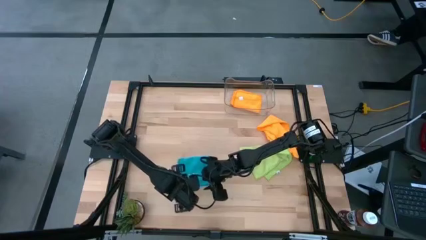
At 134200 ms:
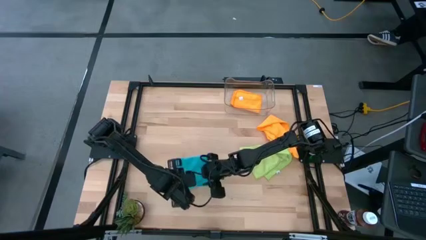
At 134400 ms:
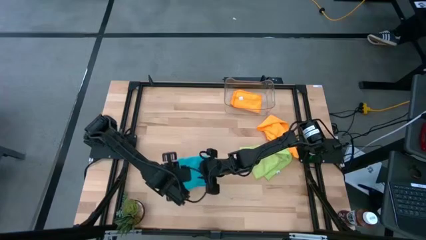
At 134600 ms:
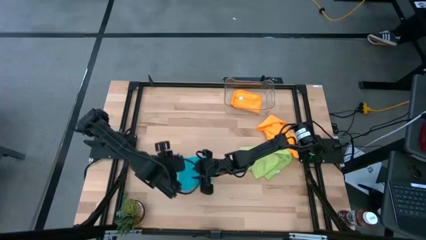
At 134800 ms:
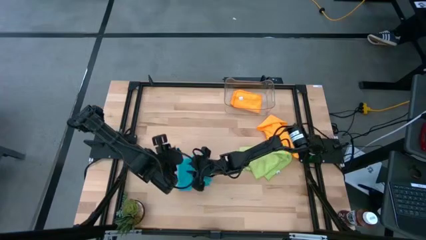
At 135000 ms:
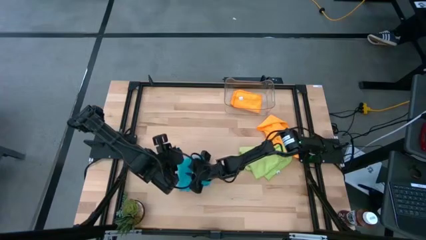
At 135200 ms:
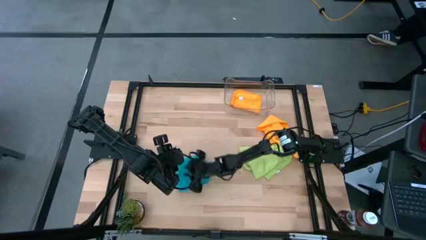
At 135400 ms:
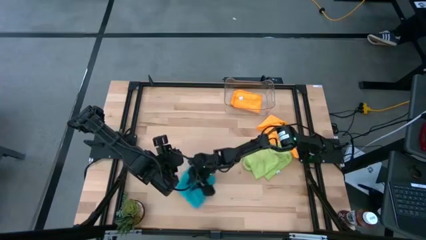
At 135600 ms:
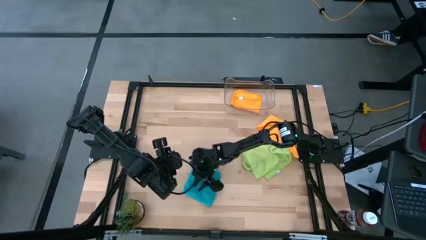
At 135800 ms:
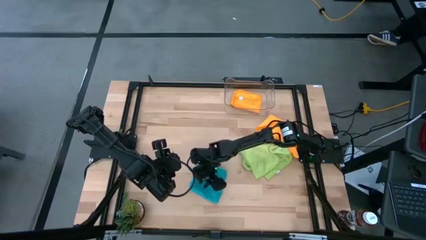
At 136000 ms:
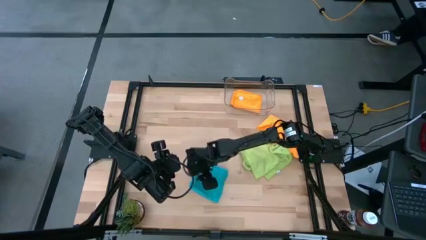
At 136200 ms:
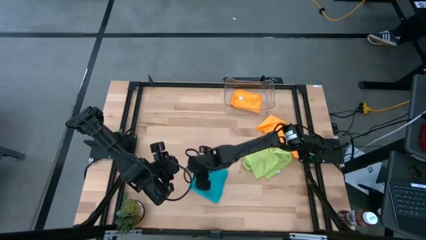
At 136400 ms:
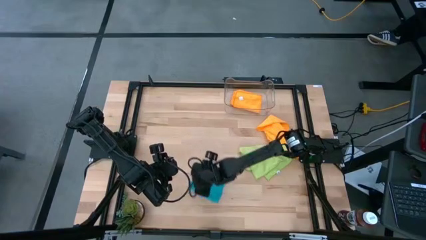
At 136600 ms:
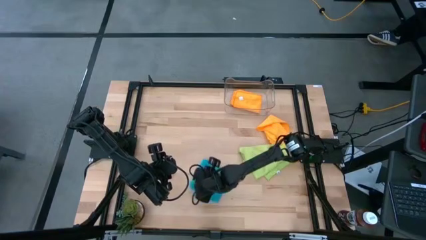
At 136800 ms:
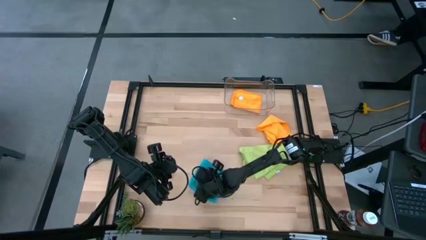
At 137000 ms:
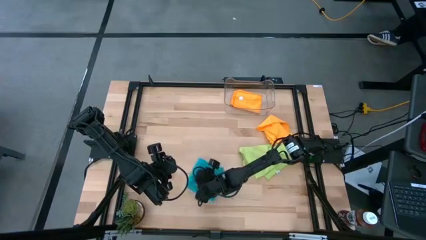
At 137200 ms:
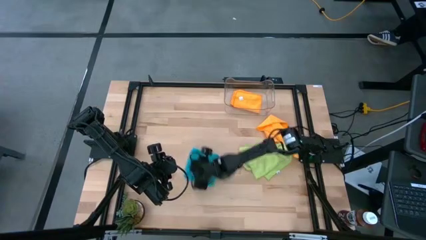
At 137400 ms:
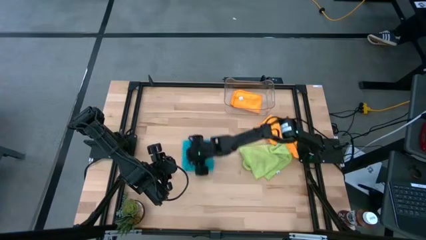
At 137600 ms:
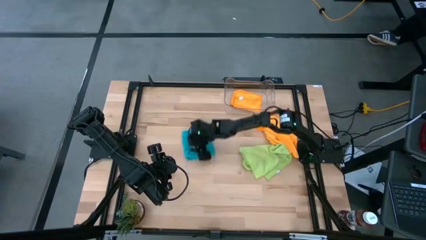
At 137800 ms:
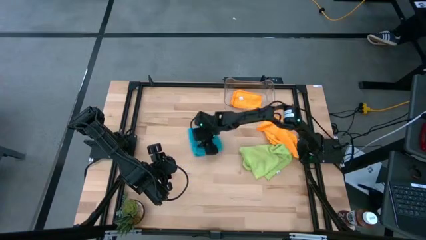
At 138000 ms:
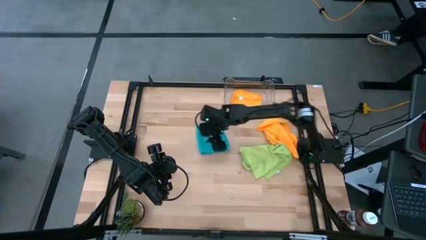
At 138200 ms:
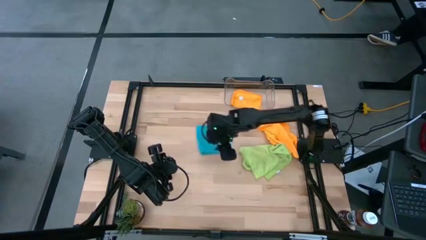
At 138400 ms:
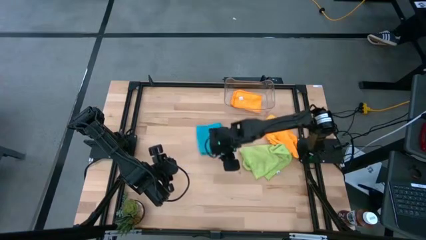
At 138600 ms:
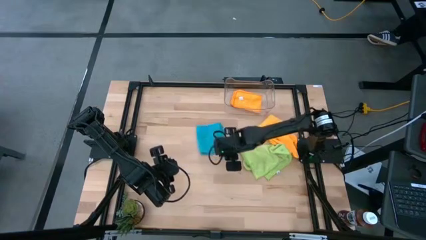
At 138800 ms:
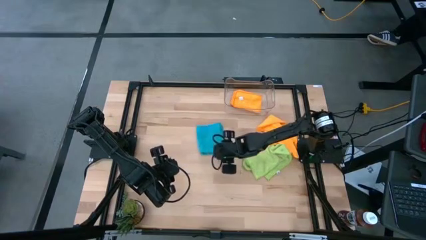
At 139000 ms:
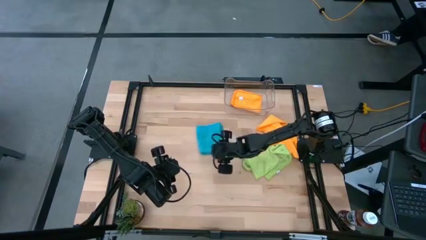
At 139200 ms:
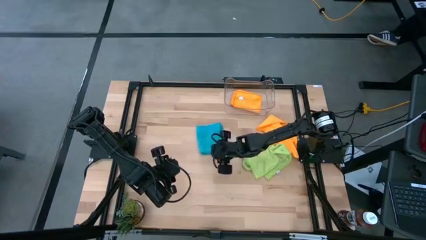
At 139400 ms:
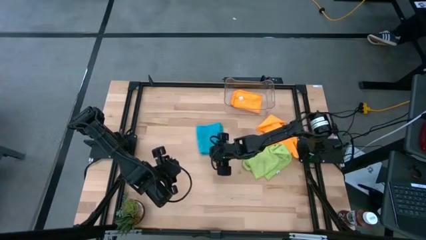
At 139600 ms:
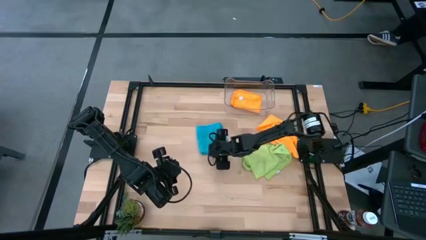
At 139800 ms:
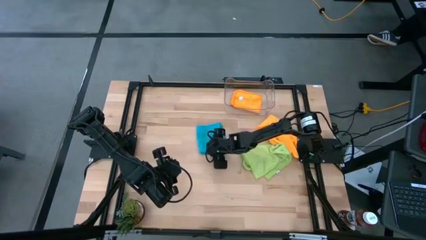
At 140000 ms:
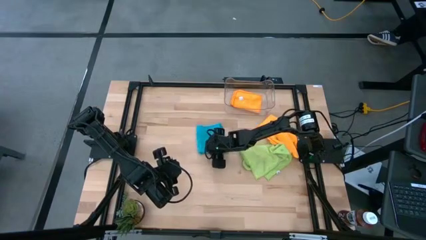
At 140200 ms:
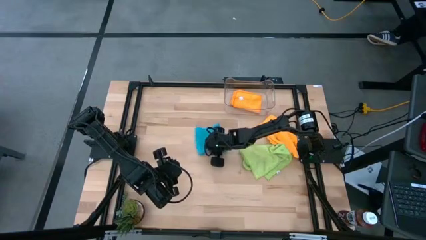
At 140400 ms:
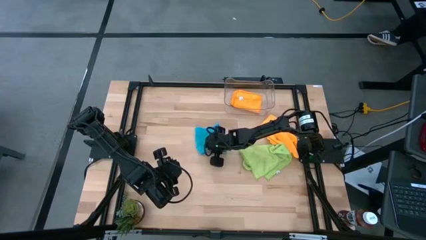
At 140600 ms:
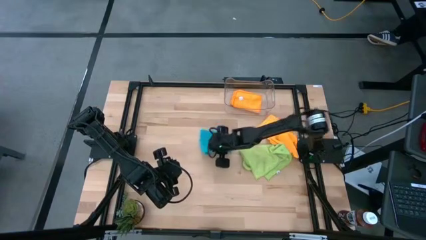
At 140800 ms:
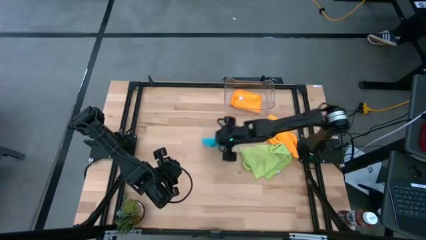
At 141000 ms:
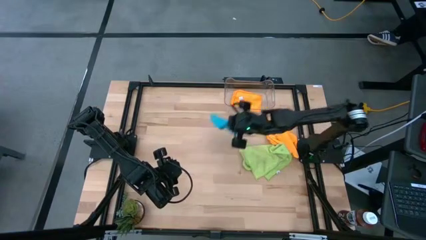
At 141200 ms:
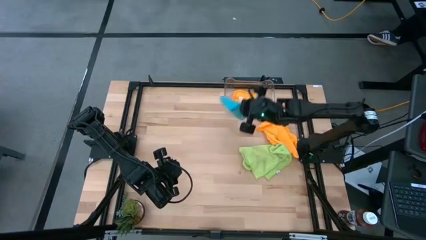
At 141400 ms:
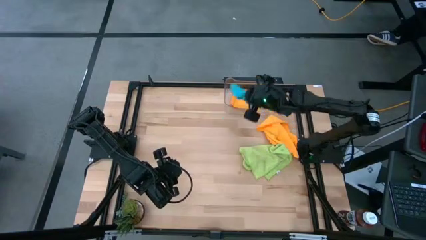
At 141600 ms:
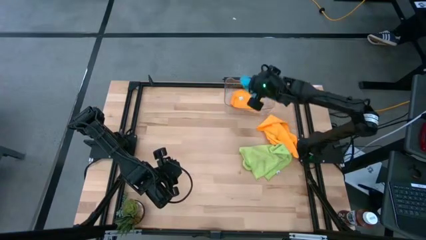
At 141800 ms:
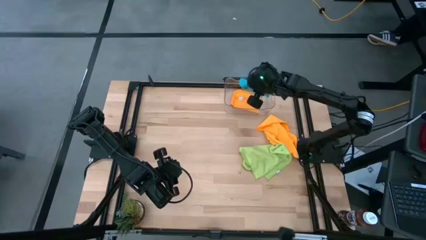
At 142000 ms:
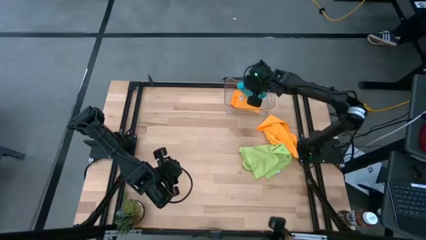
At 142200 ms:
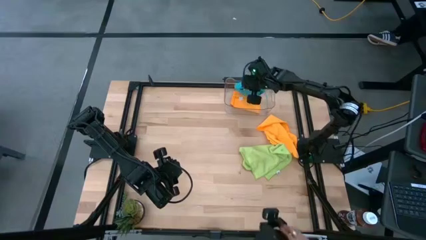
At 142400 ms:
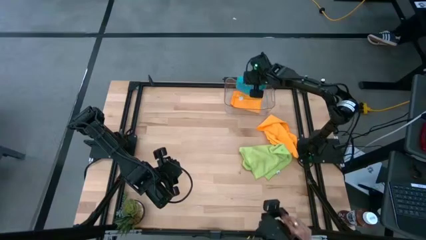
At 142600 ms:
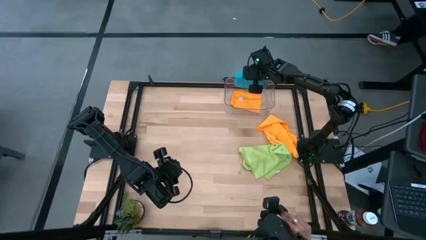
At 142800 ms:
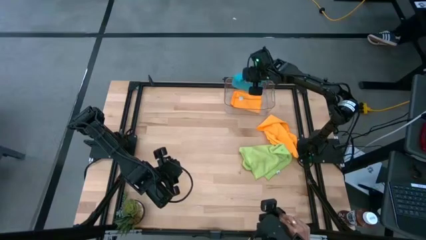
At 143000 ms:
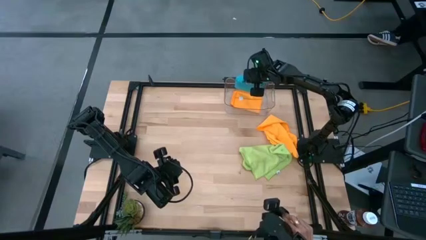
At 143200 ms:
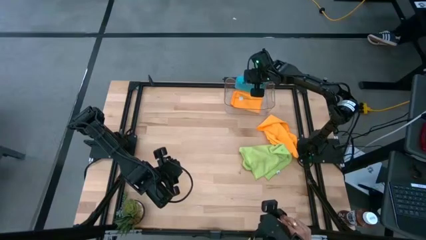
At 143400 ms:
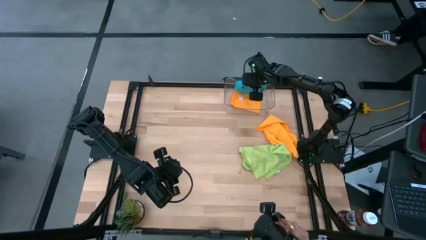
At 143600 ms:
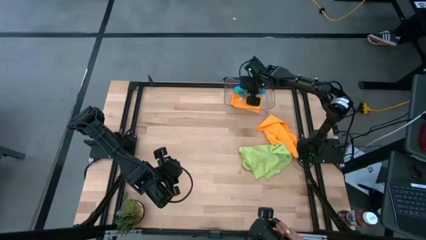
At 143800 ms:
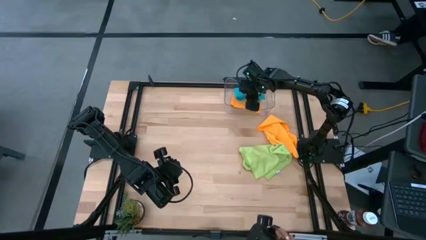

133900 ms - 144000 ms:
Task: Fold microfiber towels
Put the blue microfiber cloth into the transparent bin
